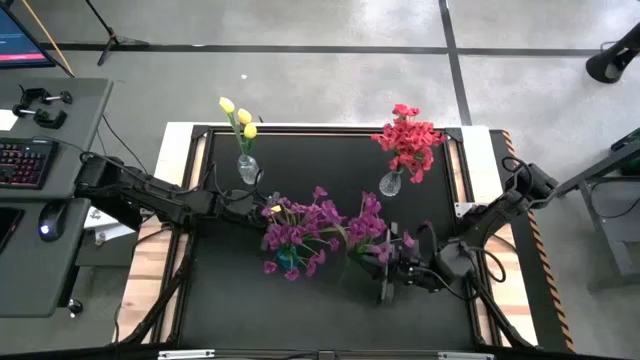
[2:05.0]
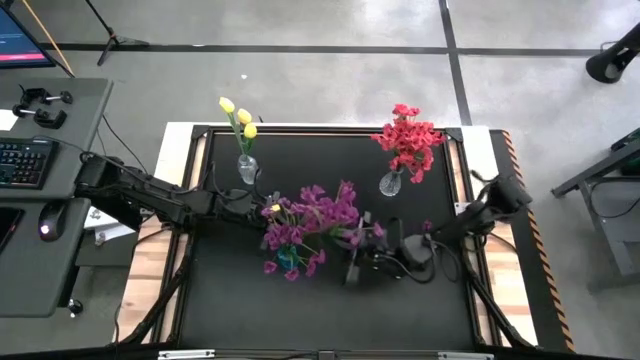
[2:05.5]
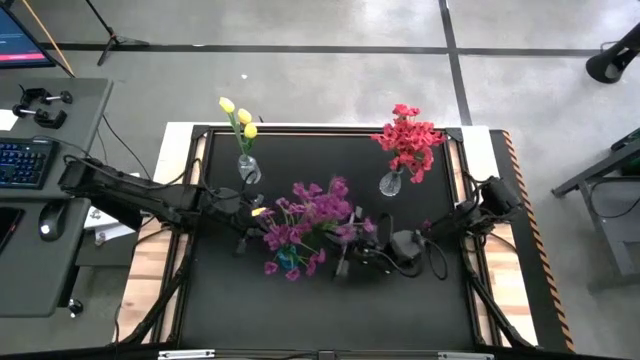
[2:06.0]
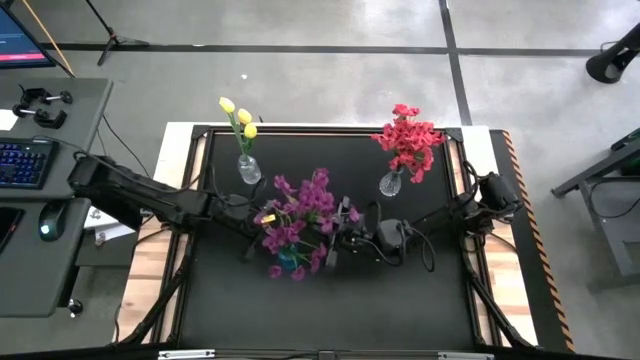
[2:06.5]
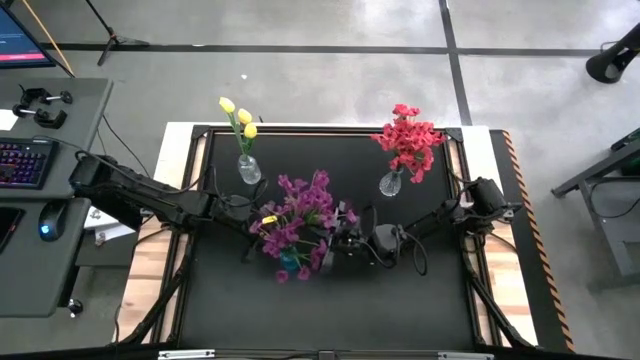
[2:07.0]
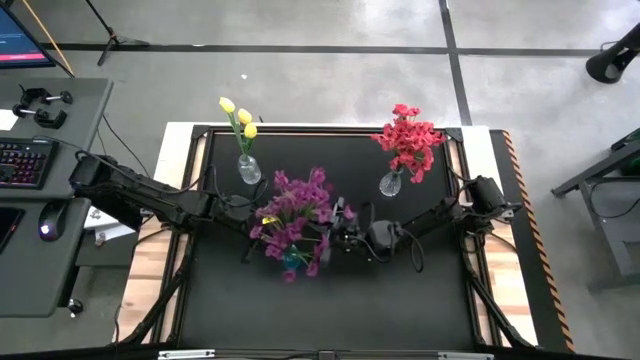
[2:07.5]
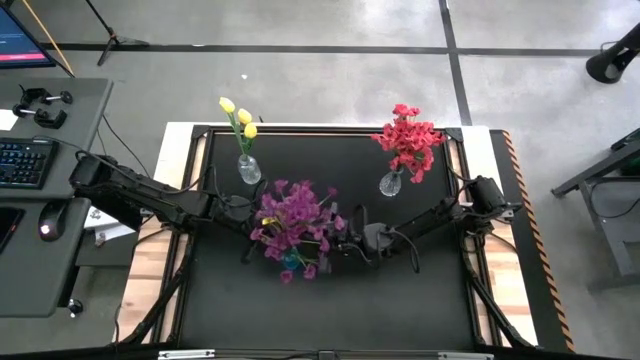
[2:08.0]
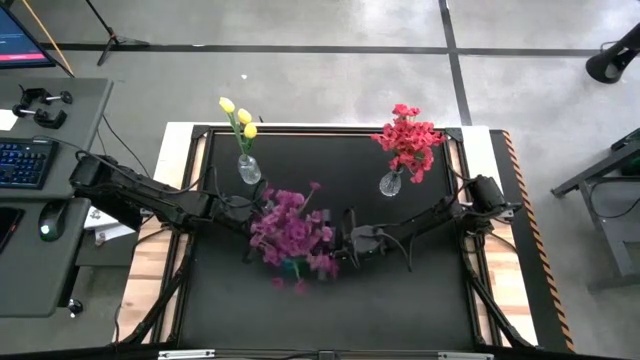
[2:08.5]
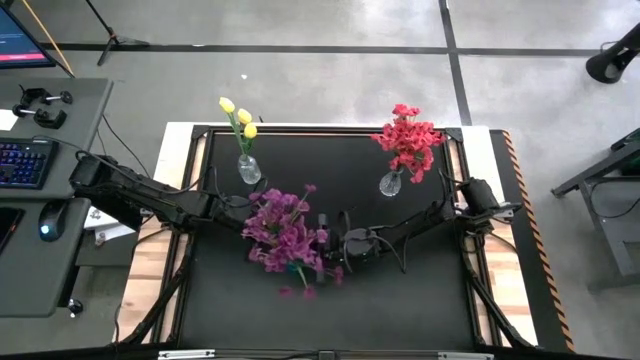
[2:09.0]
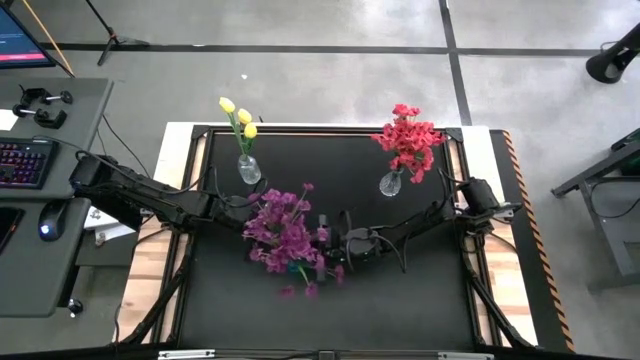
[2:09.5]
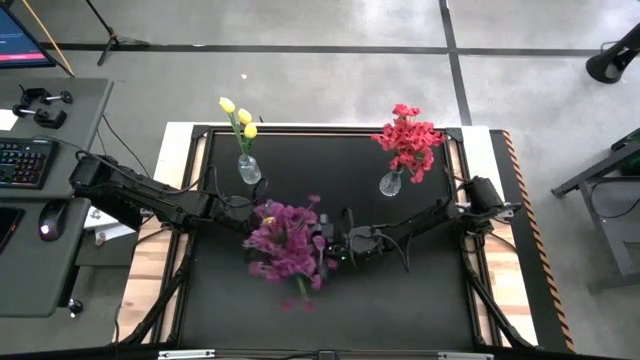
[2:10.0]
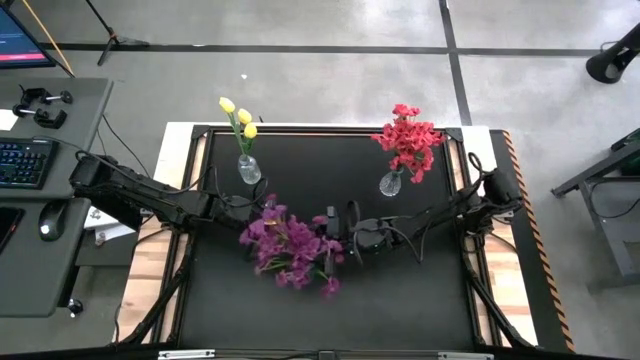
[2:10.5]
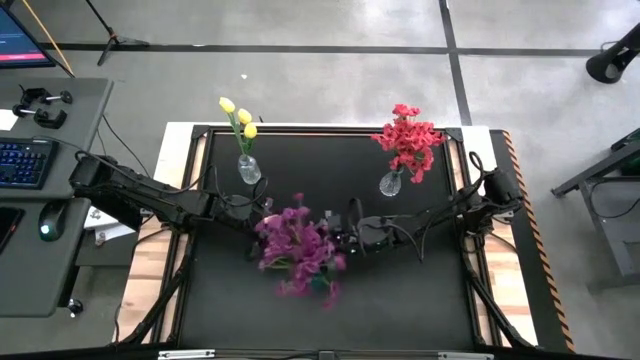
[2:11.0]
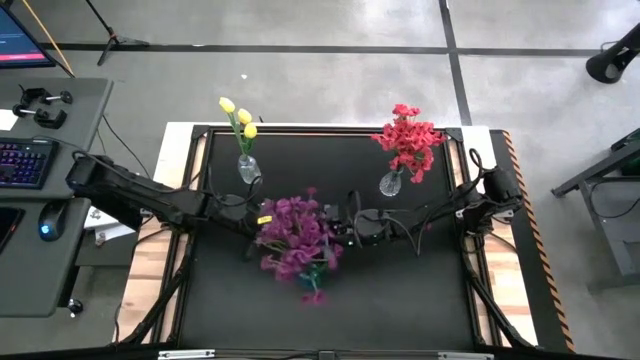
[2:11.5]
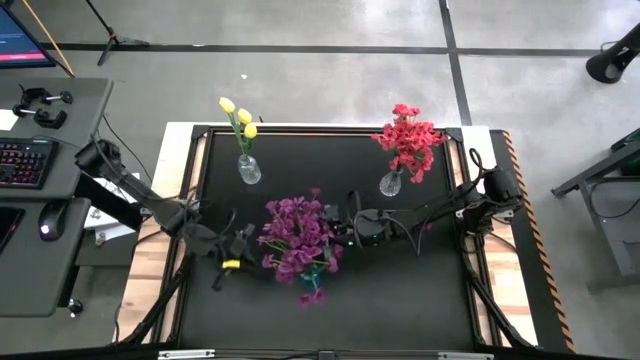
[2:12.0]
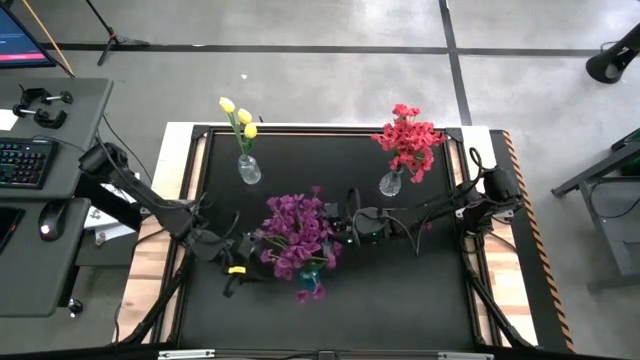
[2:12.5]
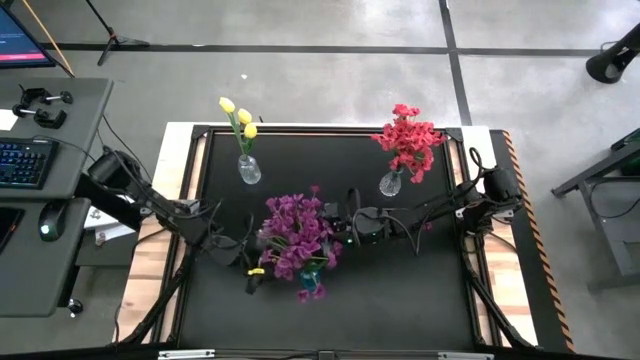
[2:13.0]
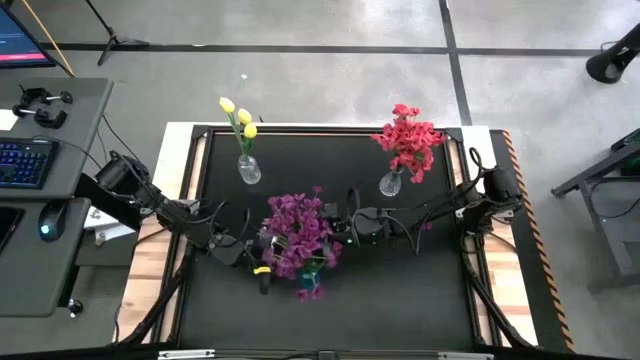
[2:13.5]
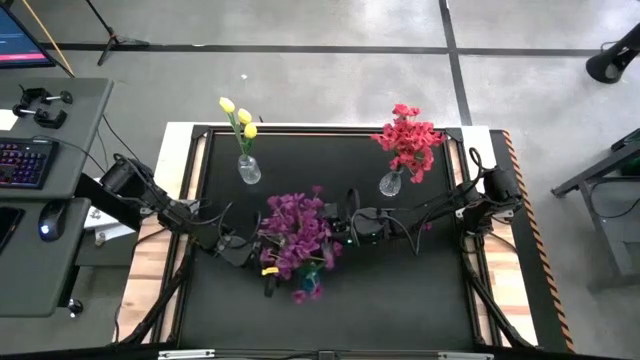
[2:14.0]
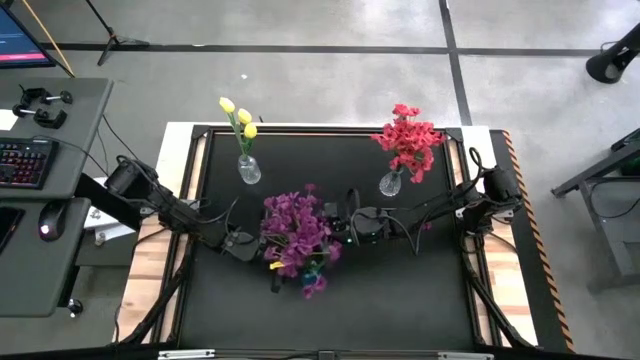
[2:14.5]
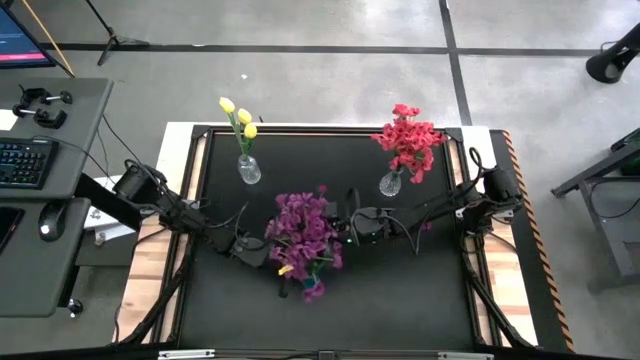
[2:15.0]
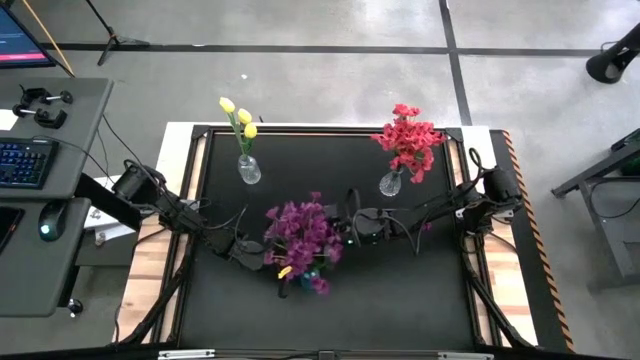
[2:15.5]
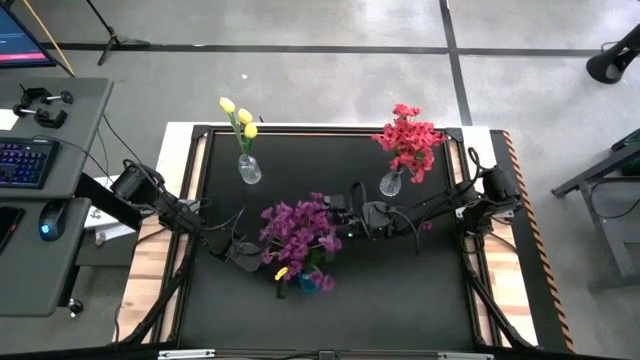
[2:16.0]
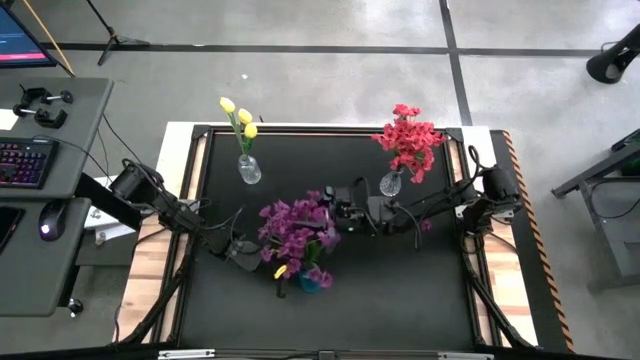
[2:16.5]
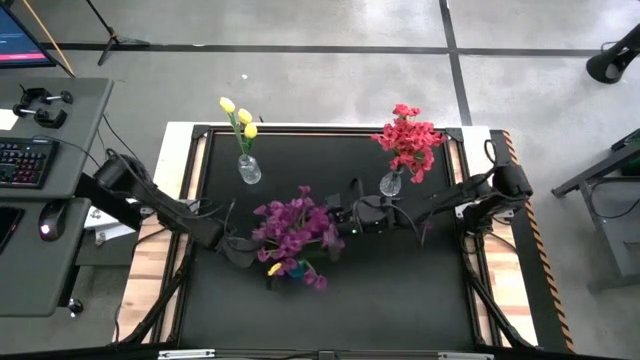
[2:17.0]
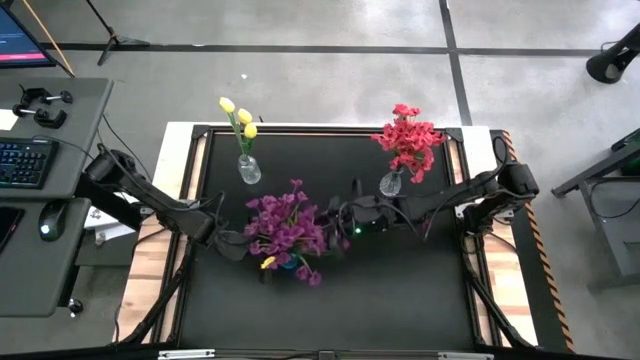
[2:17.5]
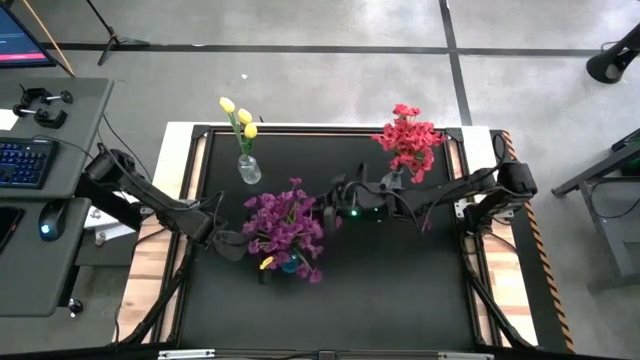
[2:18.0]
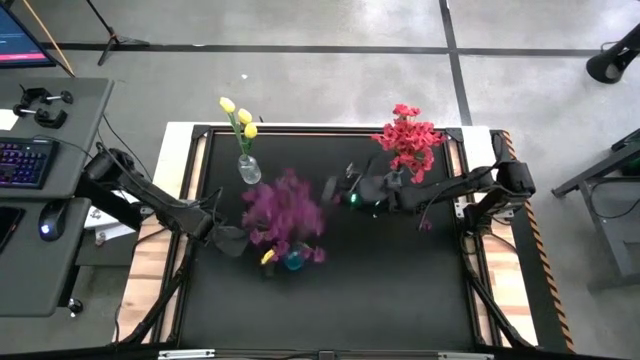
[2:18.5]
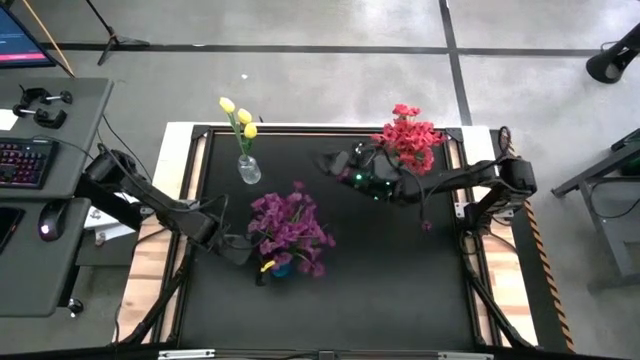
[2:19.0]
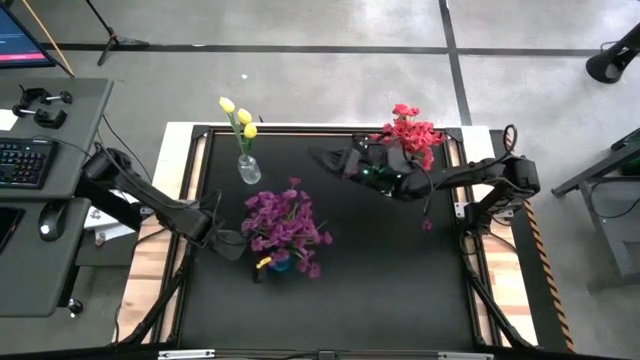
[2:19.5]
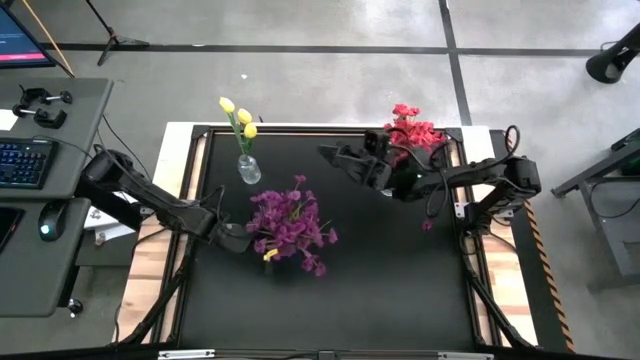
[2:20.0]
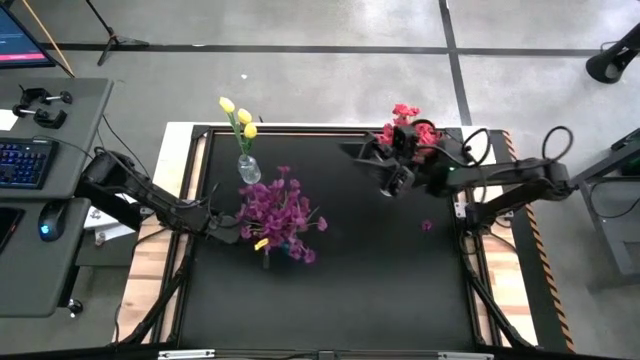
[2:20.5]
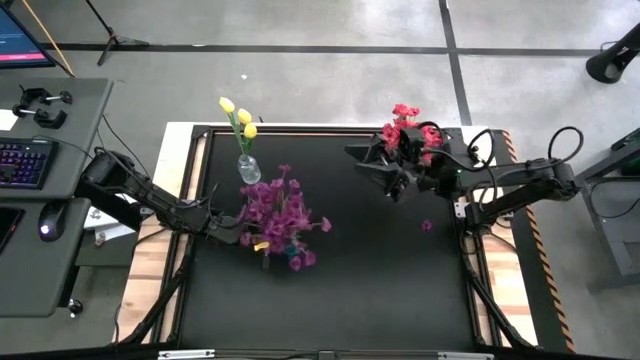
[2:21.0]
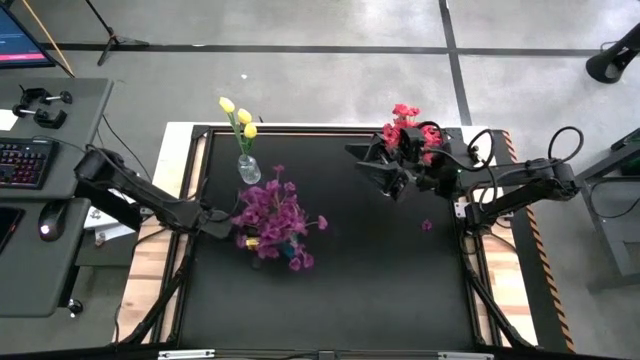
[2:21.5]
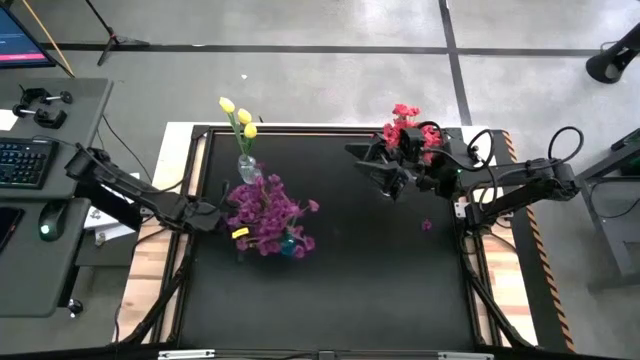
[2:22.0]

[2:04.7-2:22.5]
Task: Sort flowers into vase by color
Put the violet flowers into the blue vase

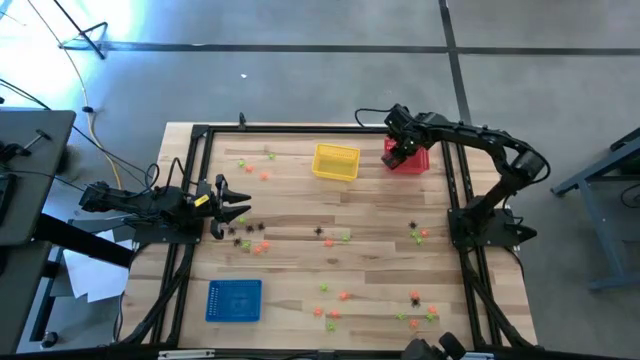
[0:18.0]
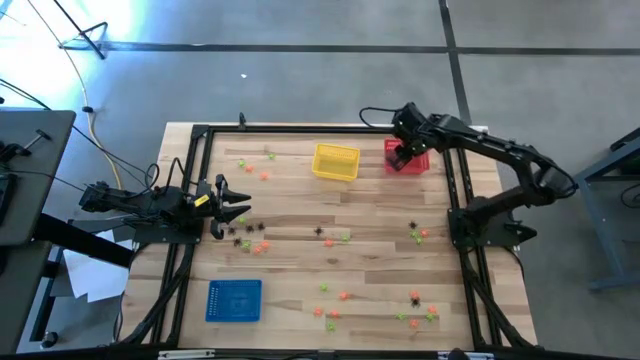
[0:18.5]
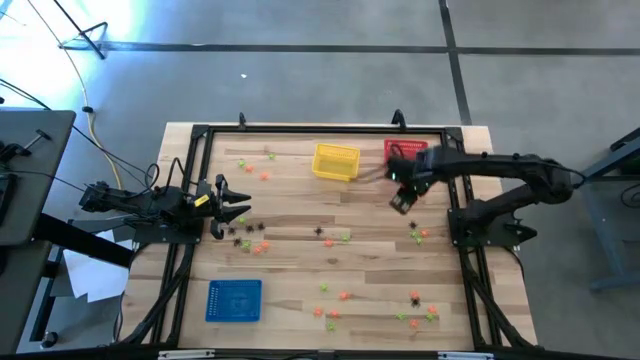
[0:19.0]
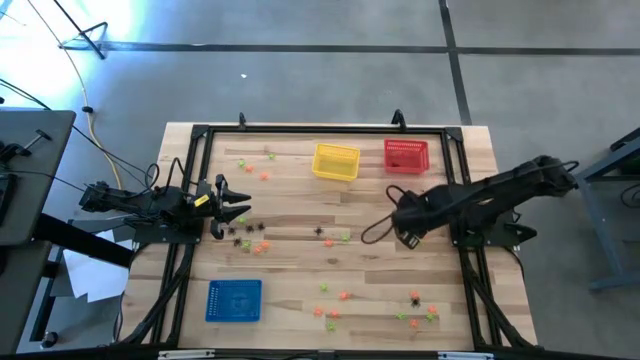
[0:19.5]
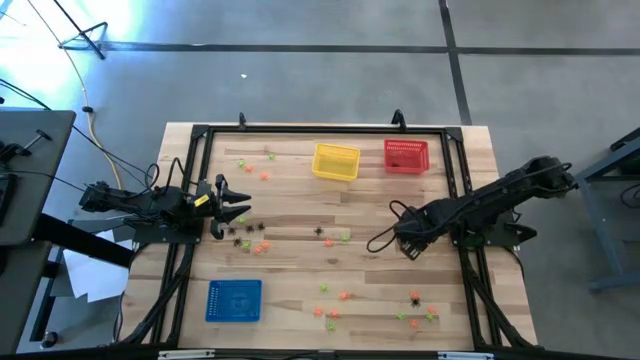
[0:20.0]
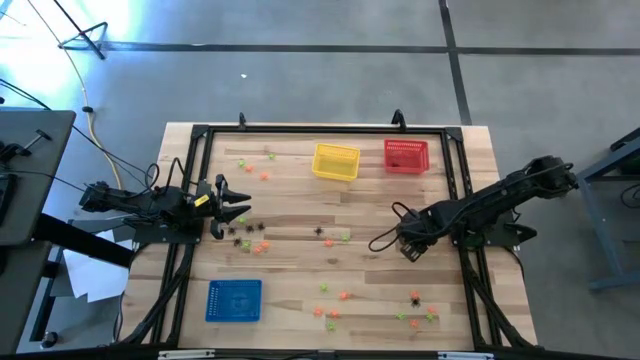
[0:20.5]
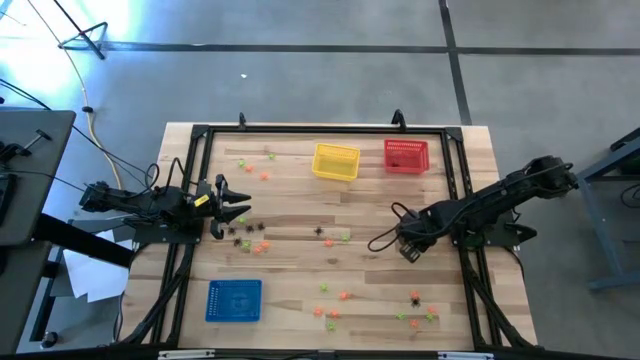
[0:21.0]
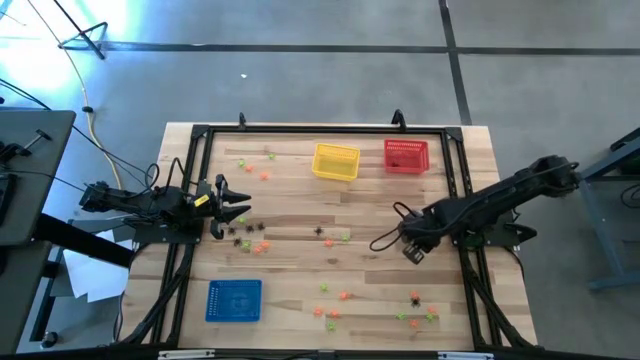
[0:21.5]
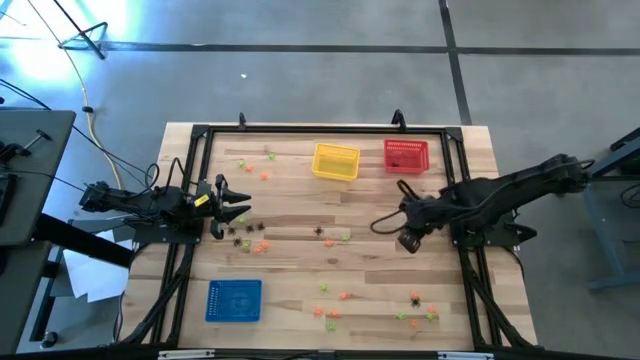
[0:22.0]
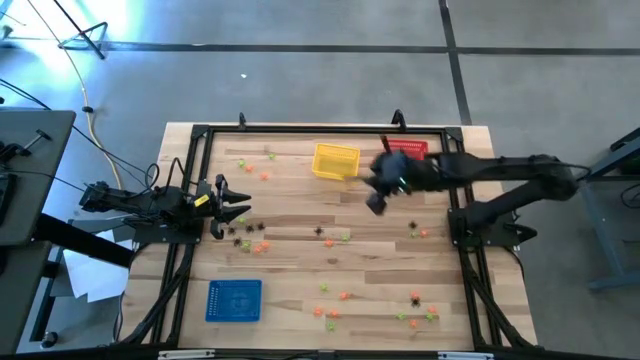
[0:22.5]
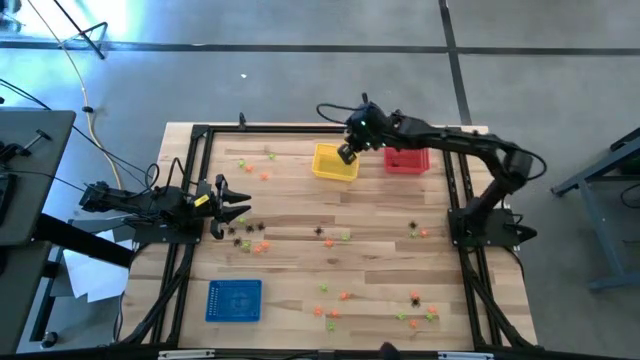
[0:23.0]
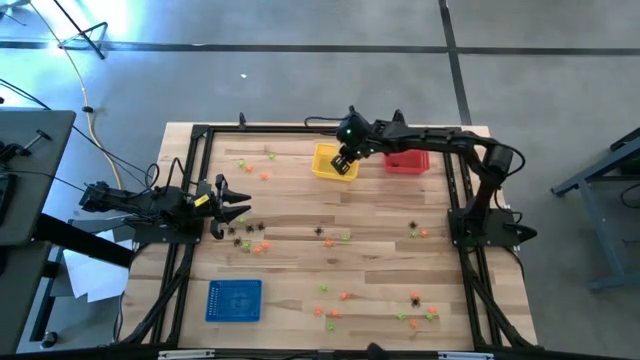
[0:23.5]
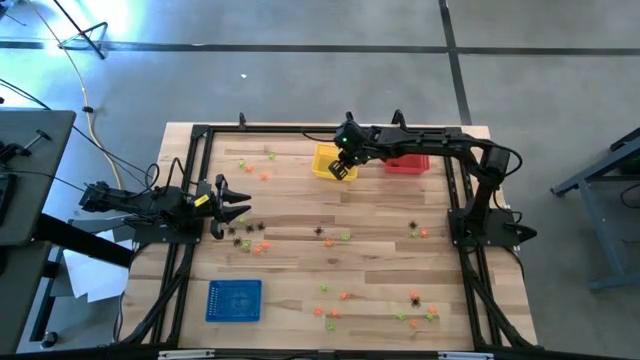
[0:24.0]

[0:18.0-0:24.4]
Task: Sort Halloween decoration
Put the green spider toy into the yellow bin
